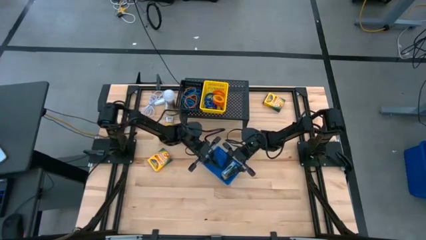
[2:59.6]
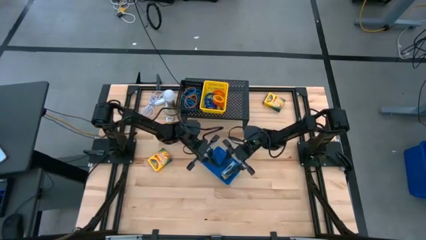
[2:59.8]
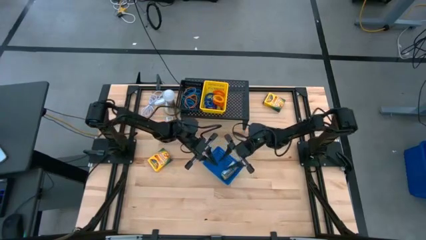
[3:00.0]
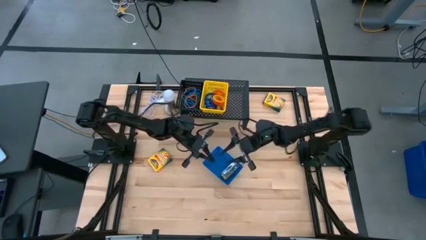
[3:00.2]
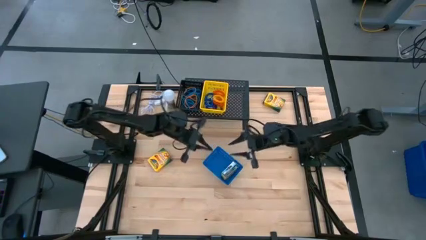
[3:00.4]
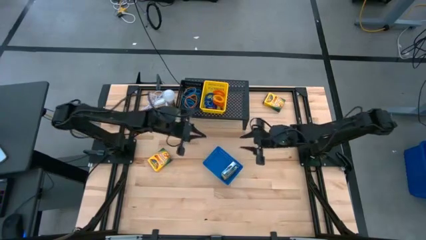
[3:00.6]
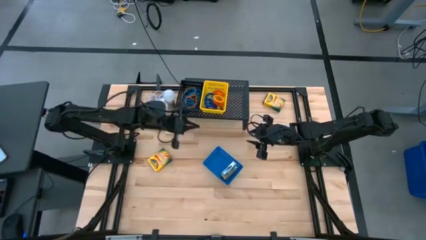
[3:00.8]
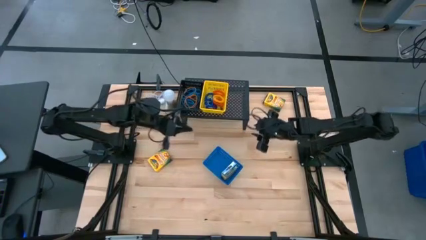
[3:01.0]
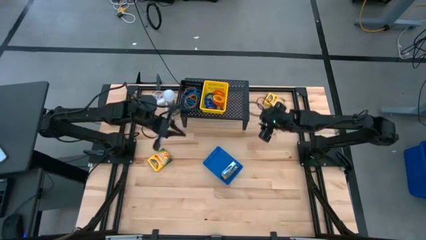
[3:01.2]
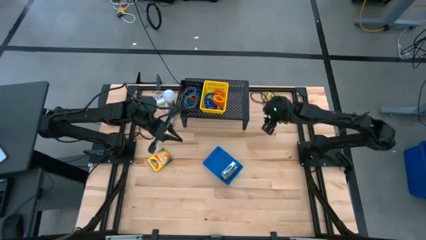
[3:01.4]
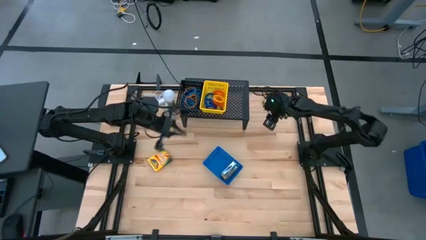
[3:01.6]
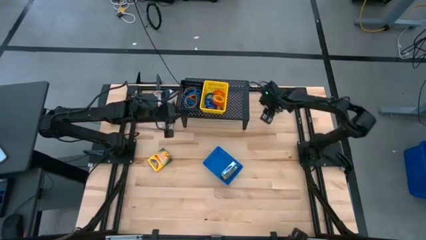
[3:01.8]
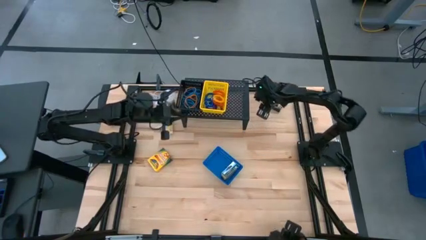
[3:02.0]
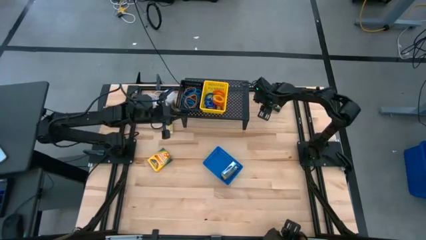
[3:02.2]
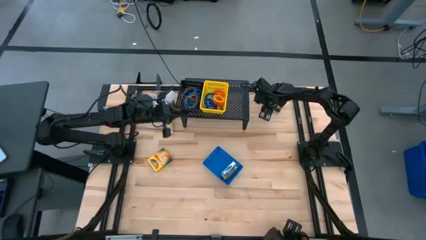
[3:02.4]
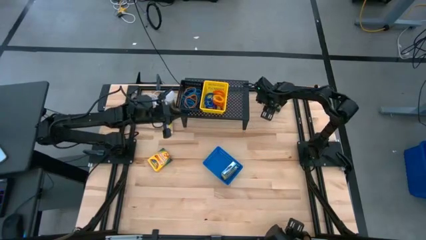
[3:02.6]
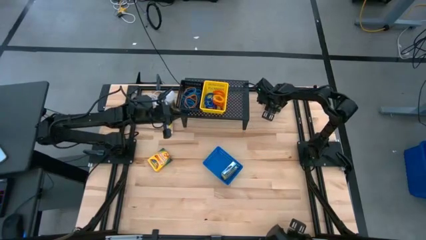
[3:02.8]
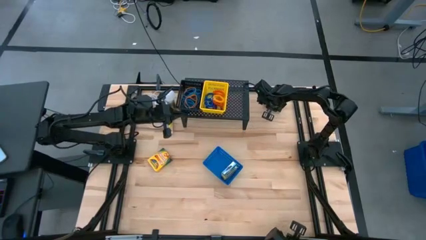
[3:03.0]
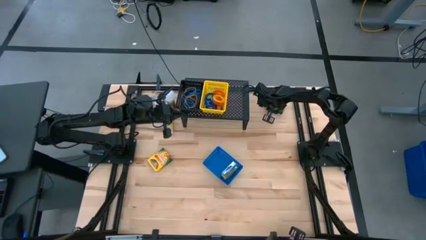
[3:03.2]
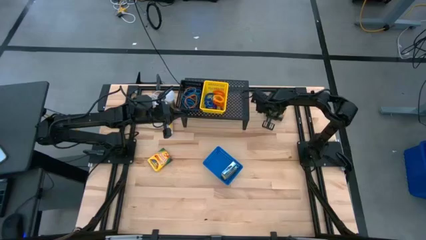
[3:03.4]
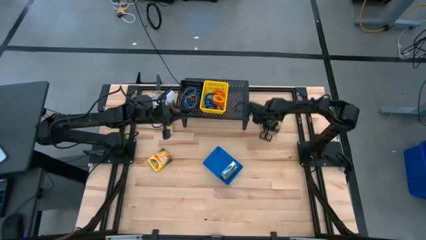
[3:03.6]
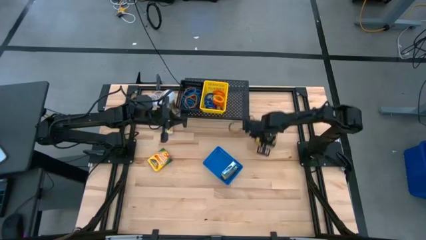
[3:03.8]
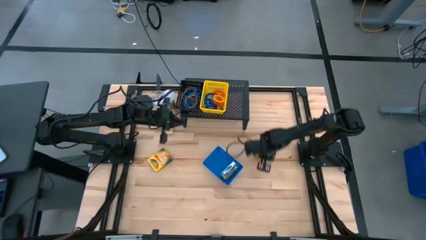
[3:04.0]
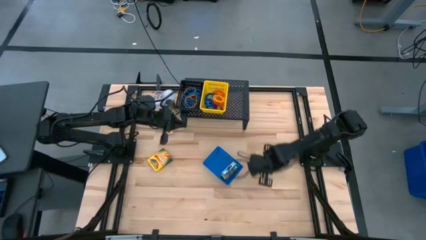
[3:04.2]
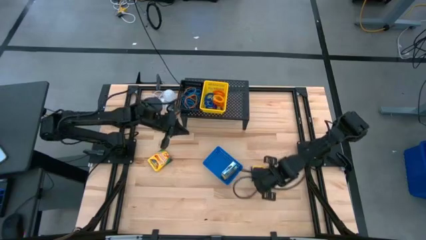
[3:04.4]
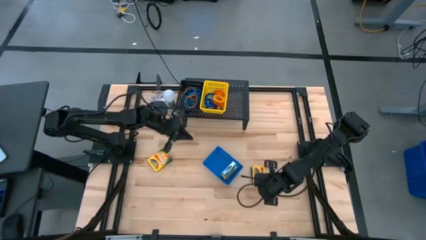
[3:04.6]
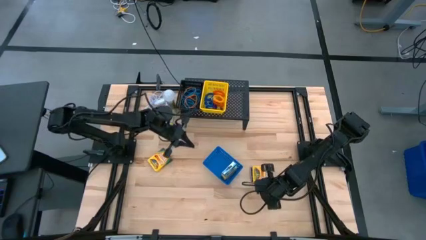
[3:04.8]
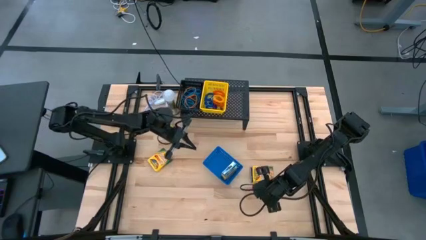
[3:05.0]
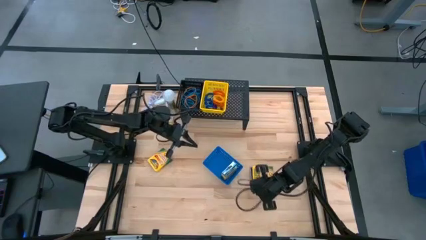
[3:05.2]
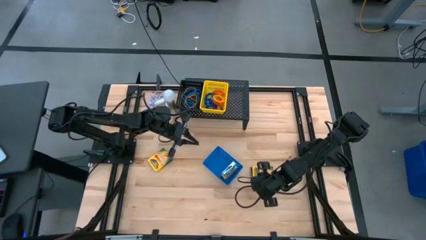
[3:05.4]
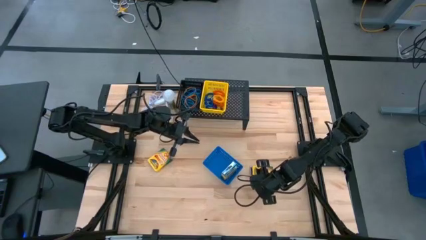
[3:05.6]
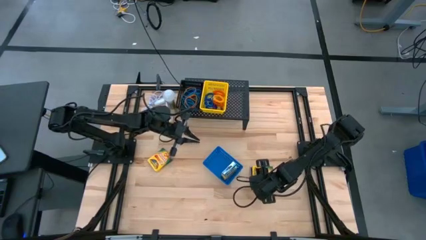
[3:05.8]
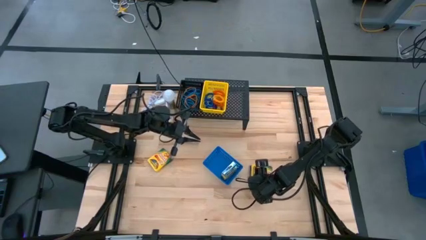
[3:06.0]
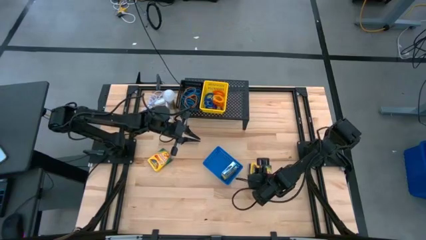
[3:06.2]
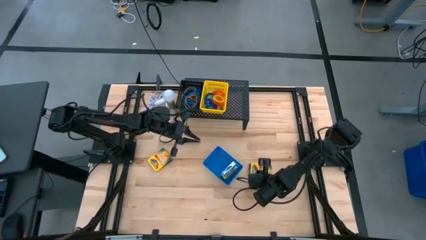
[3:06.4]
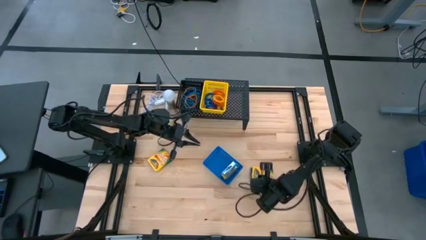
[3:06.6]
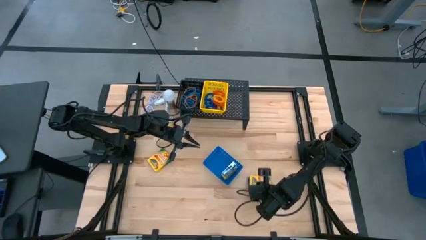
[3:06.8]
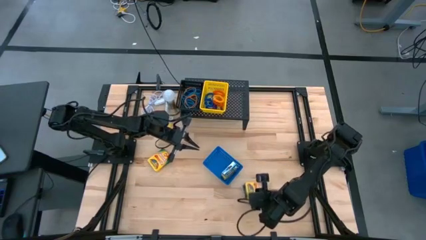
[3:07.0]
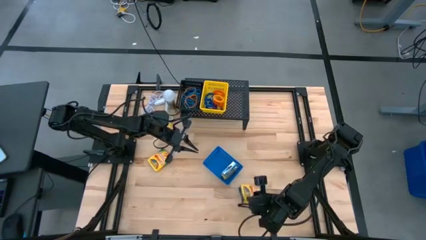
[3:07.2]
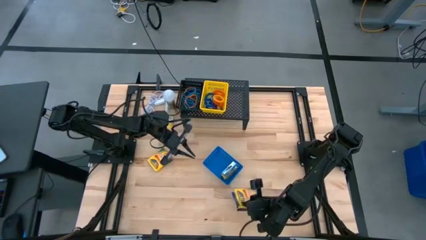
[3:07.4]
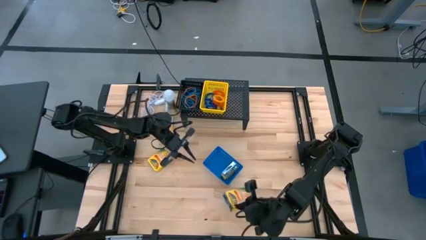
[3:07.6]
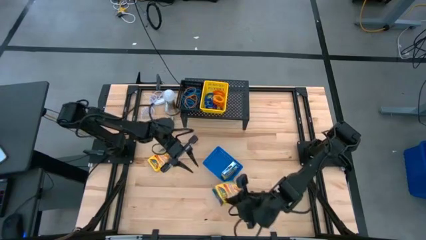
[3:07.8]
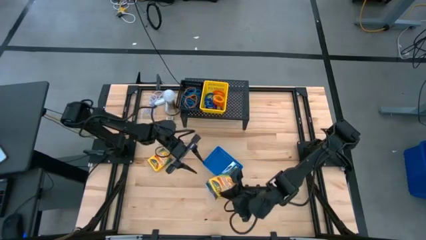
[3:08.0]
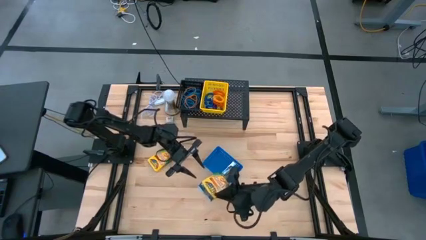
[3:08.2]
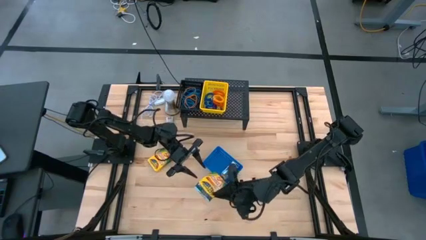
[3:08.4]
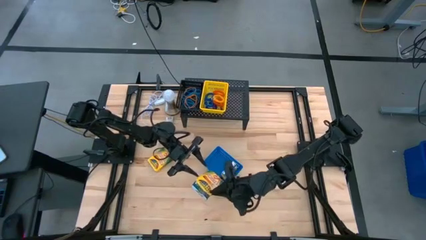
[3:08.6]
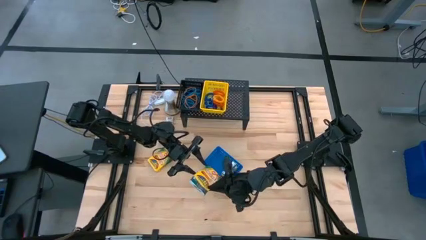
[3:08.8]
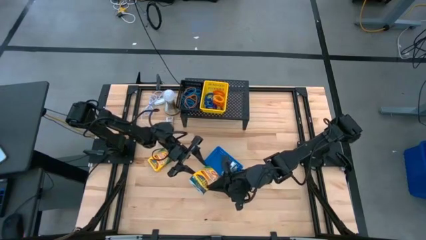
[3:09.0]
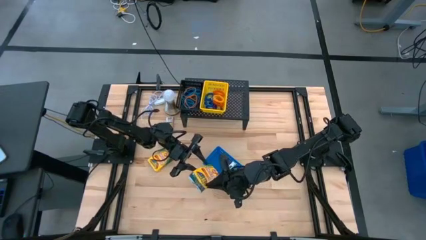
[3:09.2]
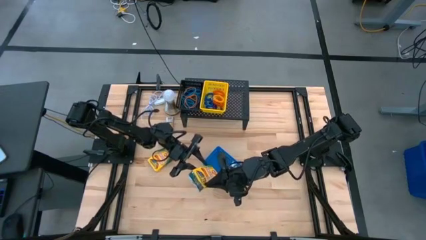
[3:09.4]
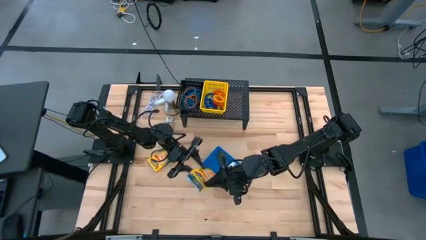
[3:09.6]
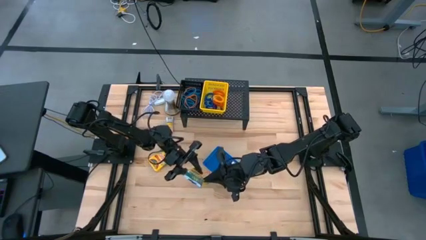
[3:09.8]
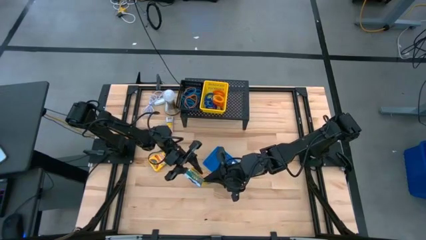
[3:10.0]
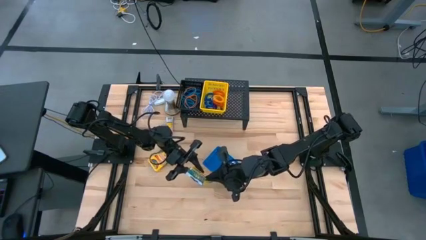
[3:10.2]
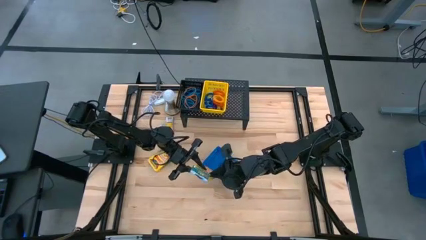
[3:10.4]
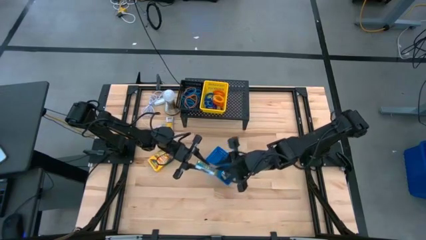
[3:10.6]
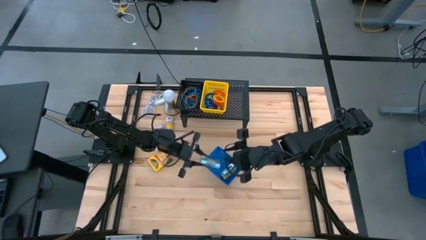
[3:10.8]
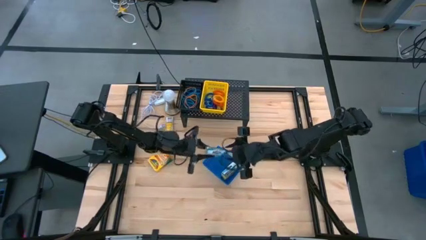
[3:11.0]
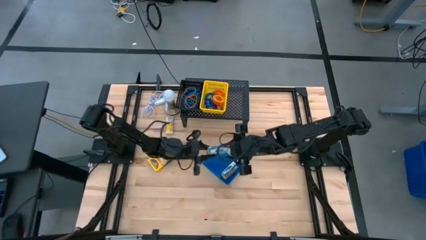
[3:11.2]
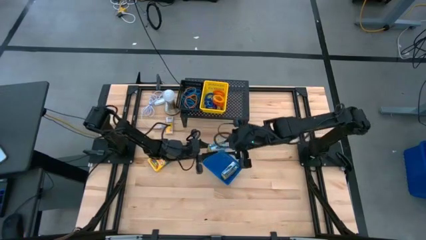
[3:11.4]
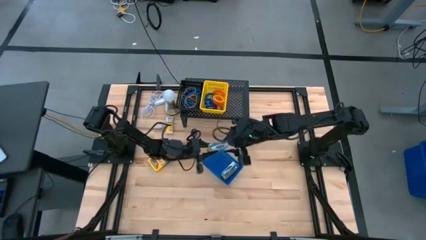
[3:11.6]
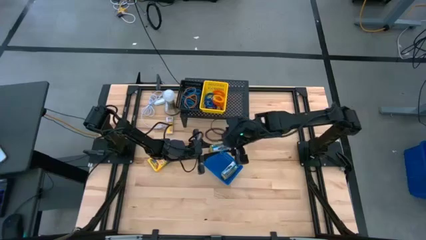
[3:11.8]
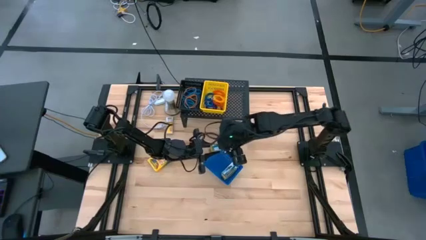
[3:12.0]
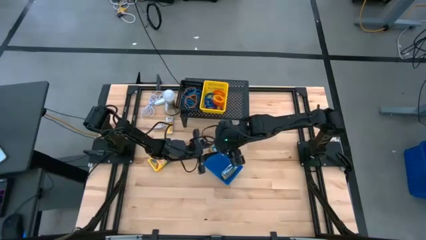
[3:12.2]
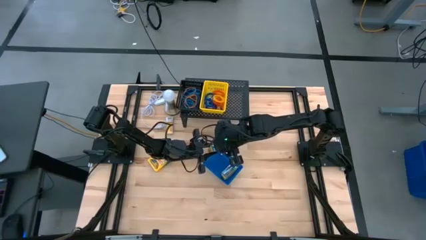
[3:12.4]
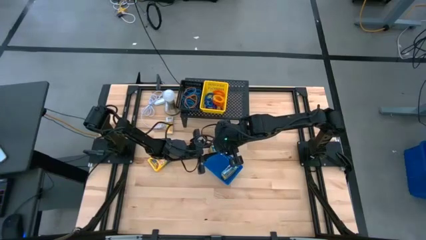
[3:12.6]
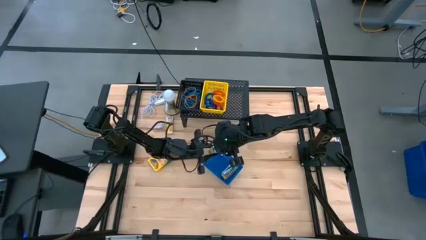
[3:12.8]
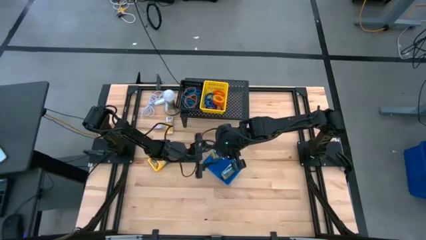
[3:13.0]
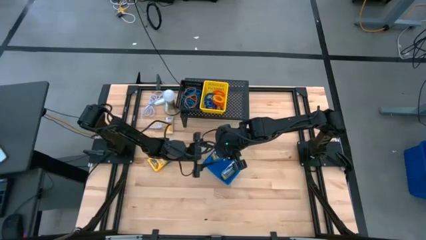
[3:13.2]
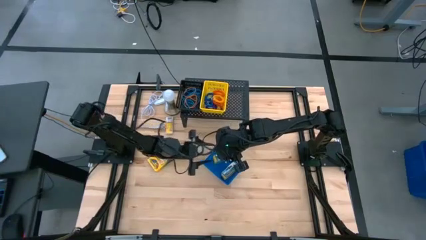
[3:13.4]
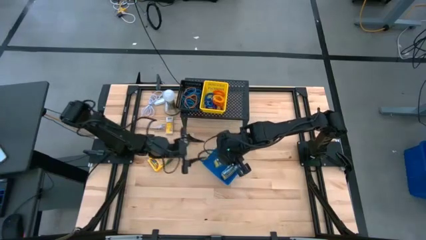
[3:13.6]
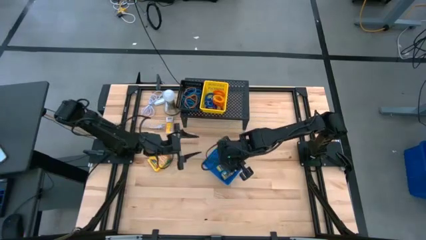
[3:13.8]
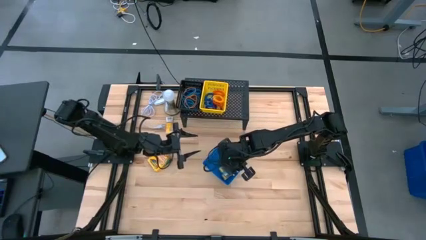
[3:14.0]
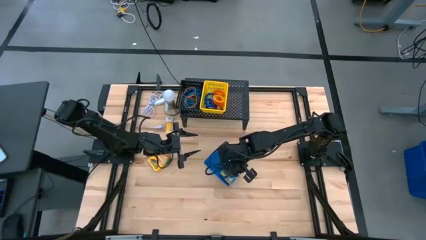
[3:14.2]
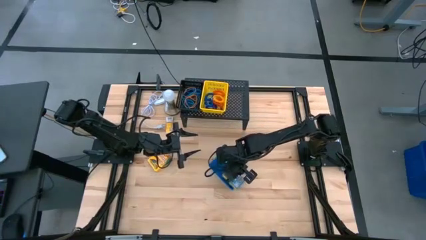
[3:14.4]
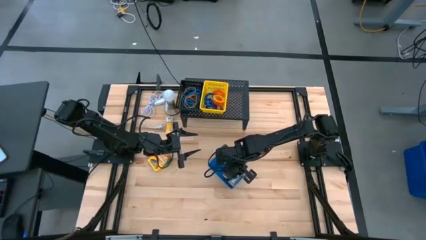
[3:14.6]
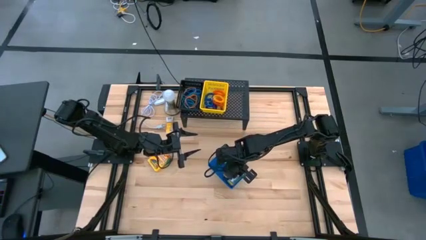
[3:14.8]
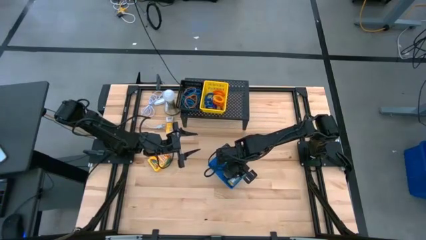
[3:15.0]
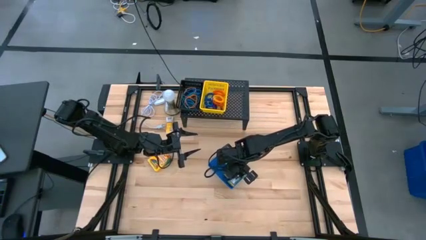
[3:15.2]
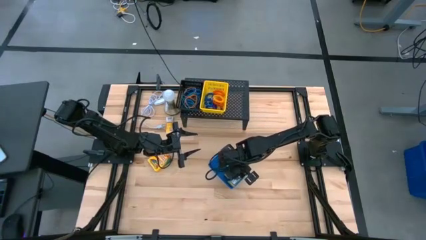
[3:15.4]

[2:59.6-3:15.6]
Task: Pick & Place Office Desk Supplies
Put the big yellow crayon box into the blue basket
